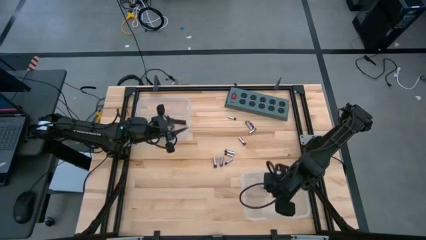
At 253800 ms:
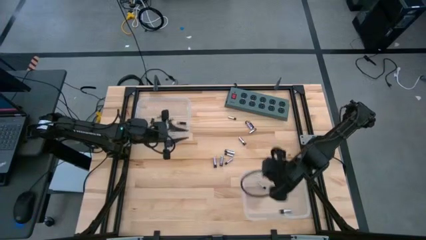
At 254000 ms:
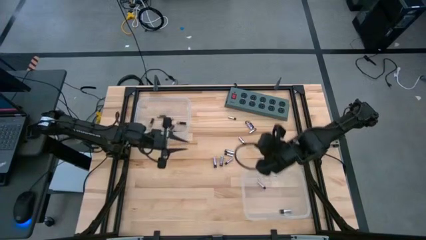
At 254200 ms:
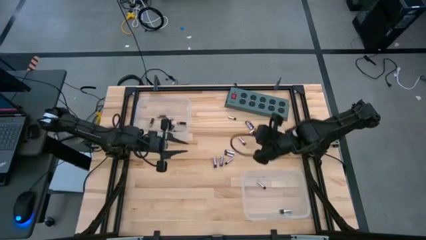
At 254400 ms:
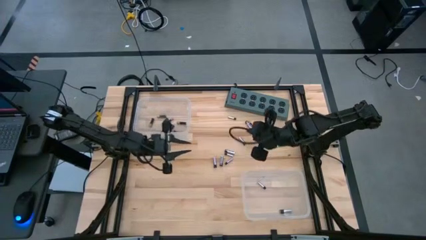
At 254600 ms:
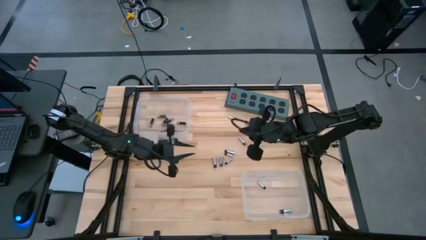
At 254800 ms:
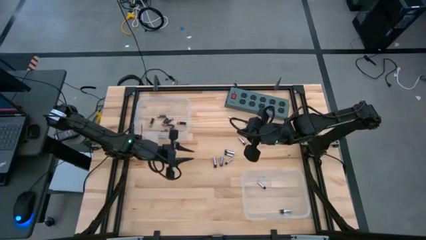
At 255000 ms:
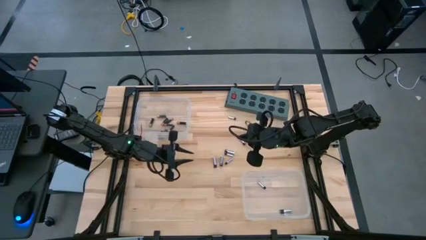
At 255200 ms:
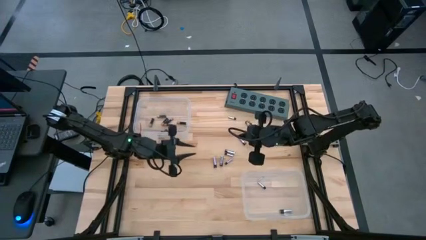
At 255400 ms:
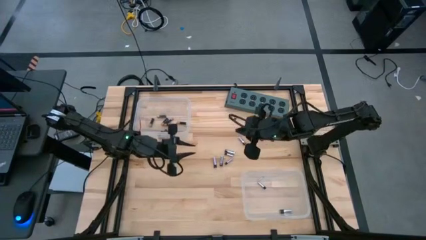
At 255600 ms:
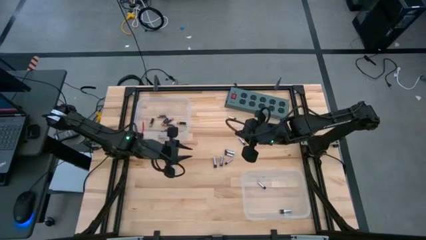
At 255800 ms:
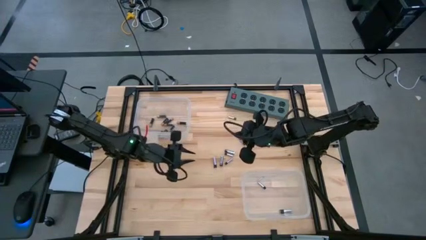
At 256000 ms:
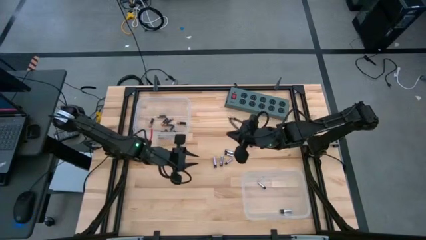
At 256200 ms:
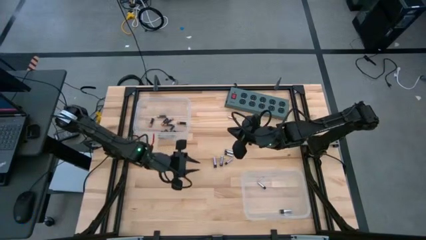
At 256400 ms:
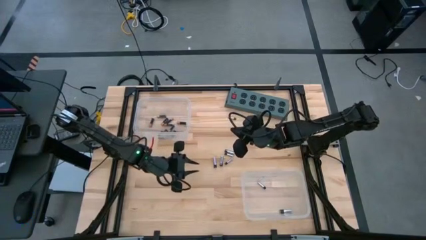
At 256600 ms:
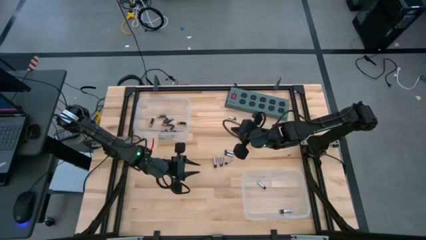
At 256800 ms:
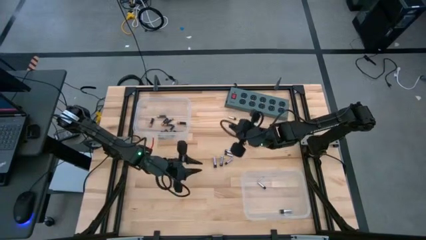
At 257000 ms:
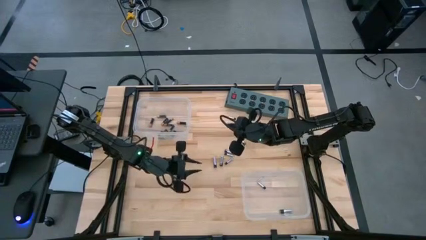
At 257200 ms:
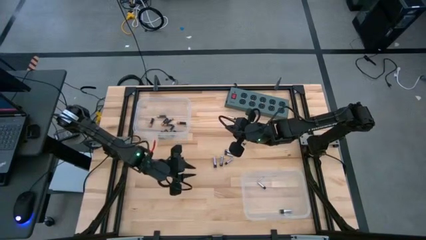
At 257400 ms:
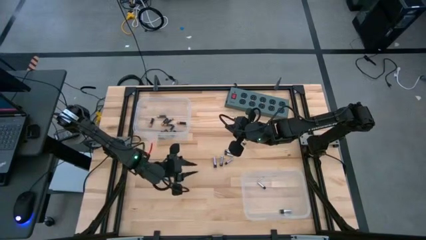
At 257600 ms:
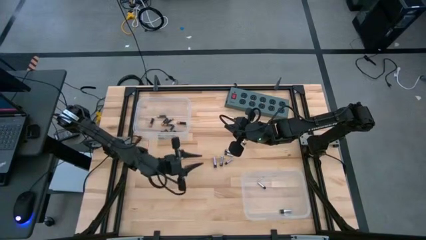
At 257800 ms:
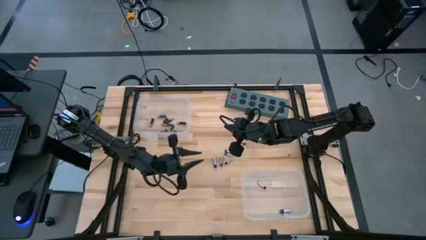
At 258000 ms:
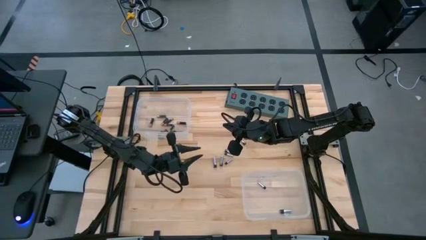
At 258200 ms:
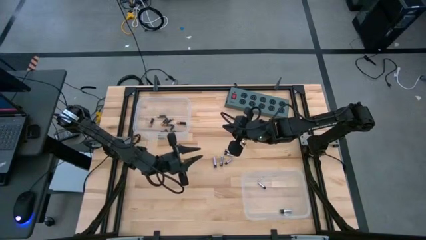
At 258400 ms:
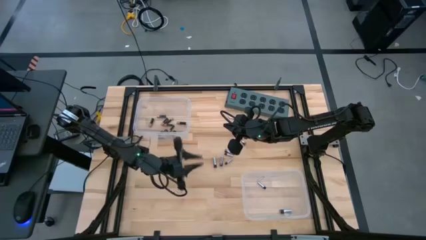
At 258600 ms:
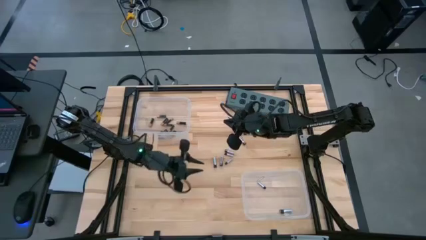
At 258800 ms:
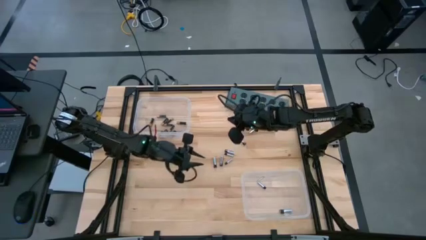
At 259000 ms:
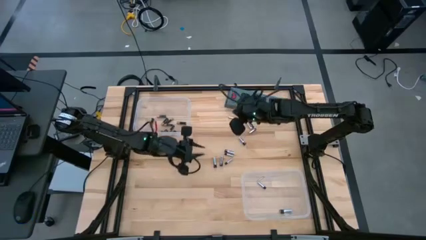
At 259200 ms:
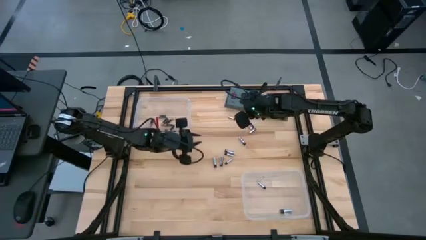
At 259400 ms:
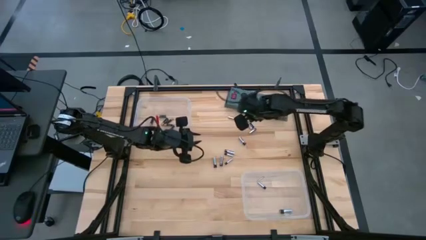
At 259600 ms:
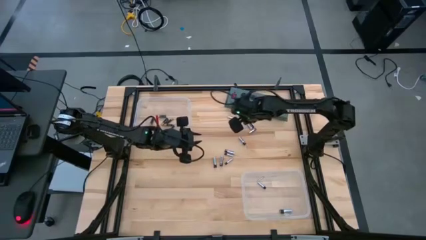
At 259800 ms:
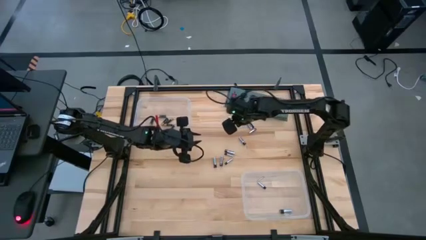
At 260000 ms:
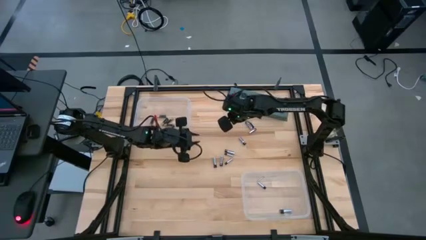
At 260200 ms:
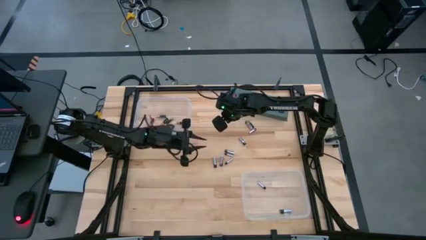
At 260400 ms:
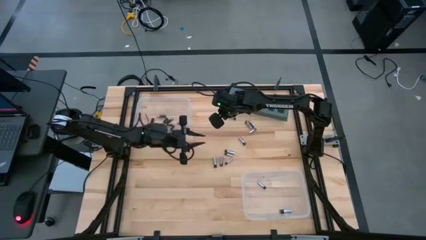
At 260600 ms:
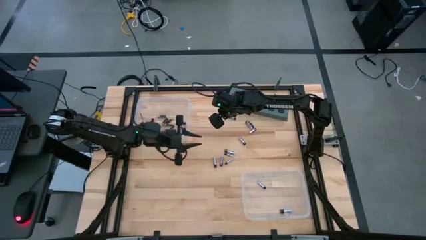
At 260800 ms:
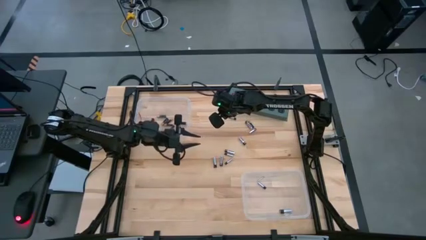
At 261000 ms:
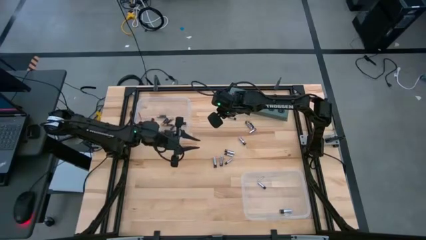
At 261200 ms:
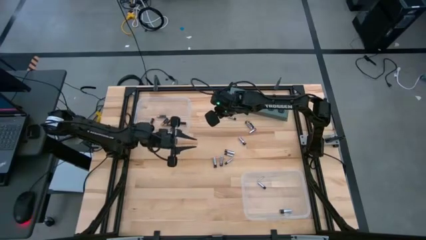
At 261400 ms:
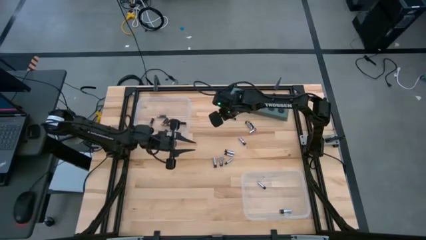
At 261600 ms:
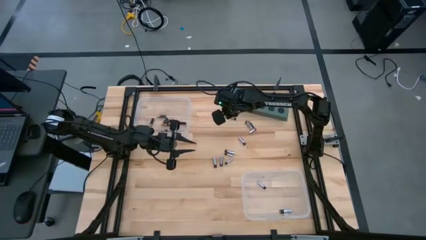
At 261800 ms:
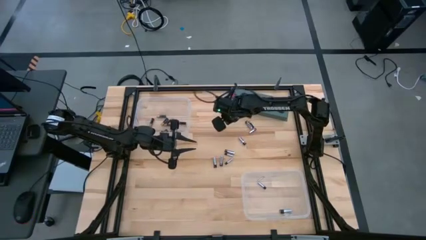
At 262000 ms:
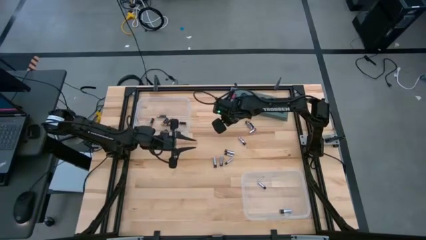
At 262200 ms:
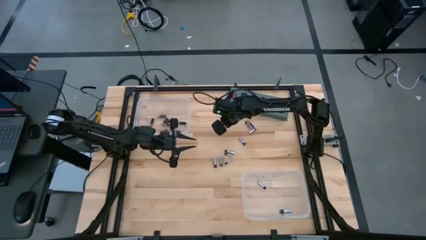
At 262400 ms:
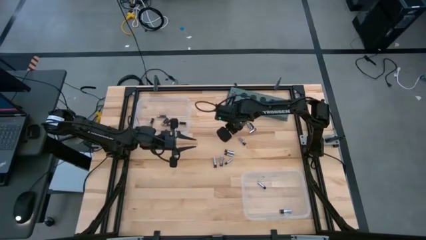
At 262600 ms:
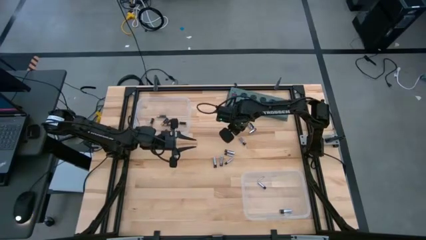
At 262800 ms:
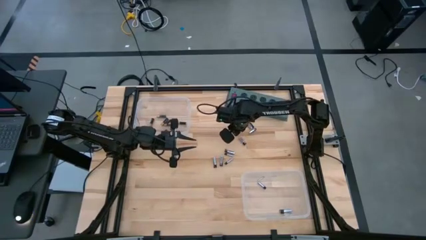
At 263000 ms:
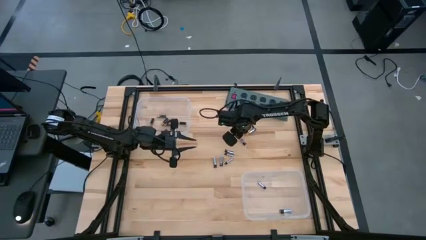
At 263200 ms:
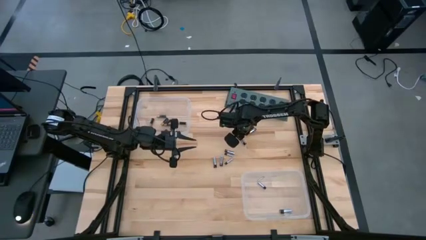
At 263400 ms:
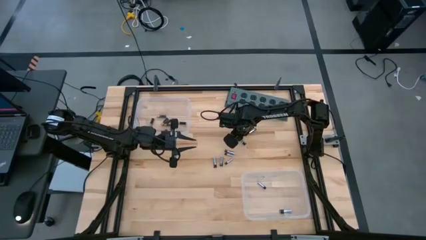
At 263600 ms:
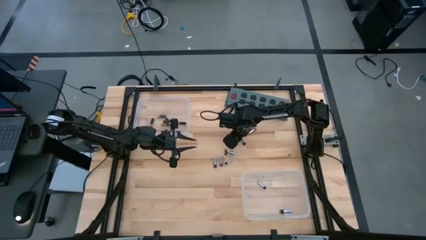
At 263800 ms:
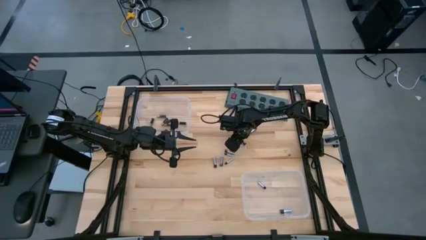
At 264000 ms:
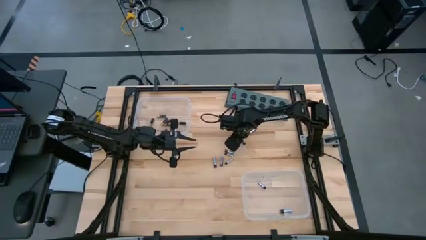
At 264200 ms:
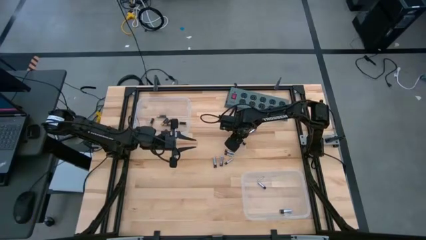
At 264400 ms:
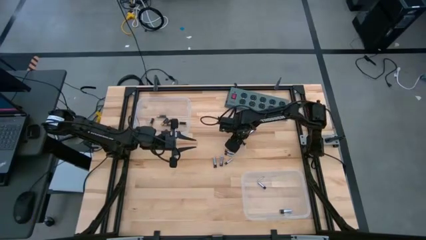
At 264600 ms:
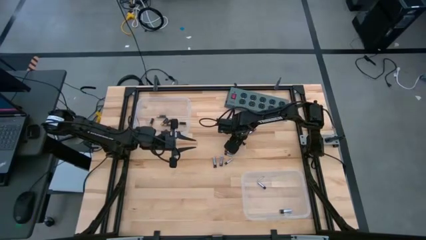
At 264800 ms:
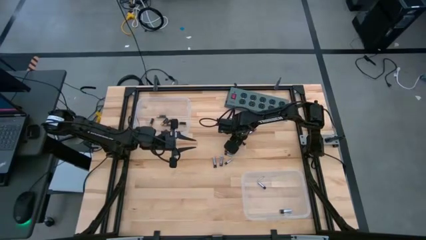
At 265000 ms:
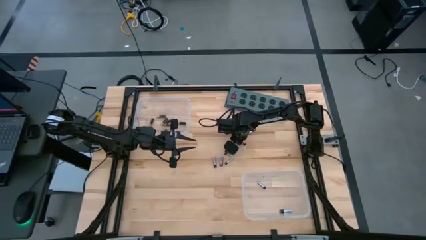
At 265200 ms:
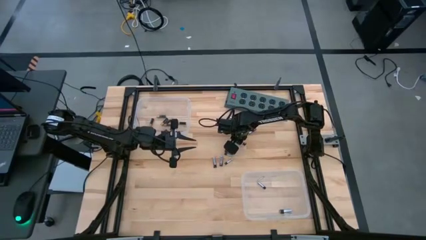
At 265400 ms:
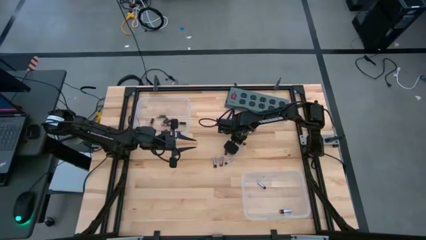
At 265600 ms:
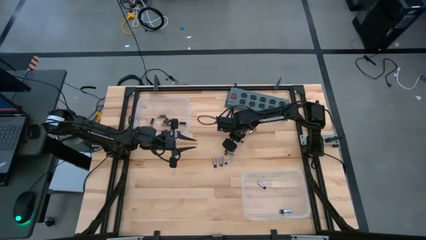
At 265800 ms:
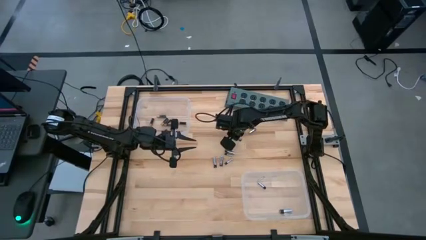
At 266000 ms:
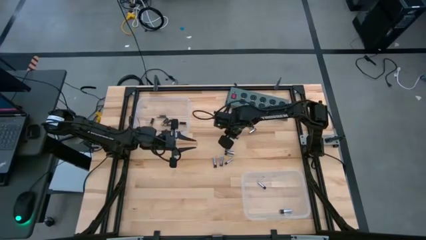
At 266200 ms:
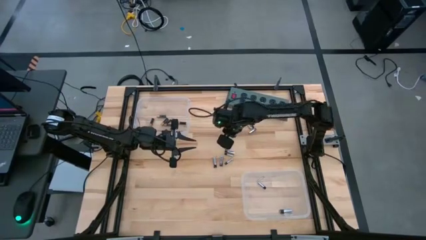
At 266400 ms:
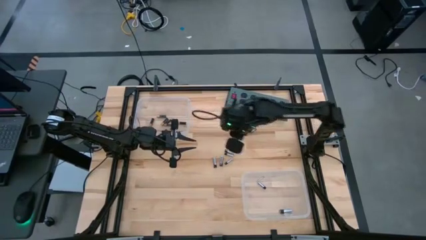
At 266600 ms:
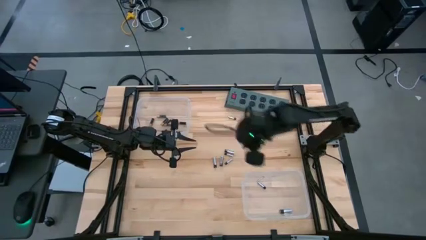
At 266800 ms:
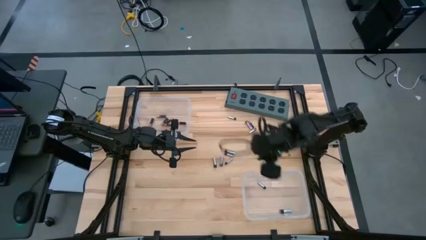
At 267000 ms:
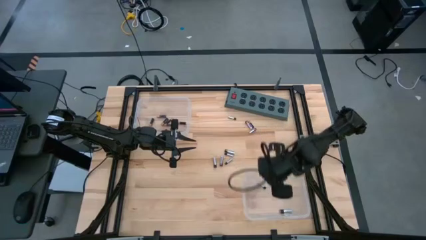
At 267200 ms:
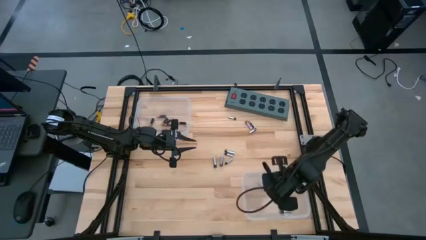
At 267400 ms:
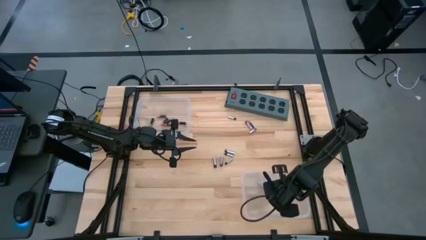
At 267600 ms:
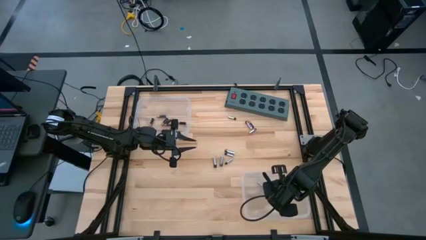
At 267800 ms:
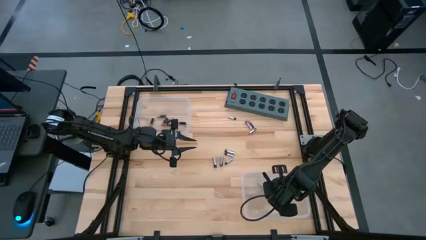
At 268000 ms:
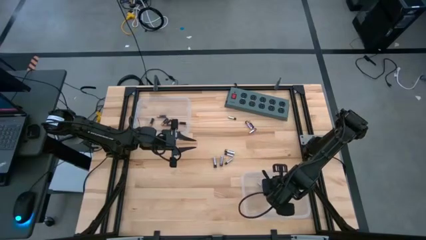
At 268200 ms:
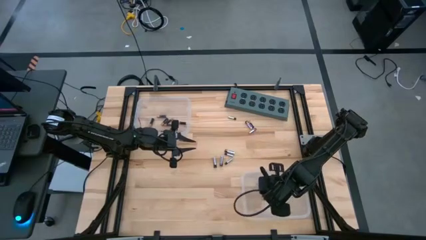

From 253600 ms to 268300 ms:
Task: Sort batteries
Put the silver battery into the bottom transparent bin
